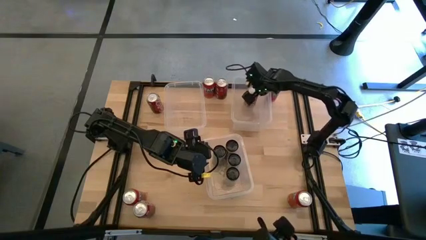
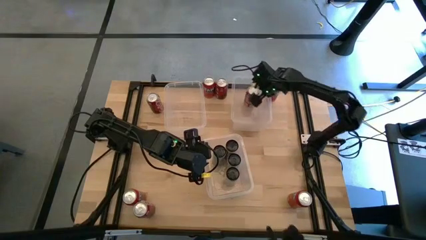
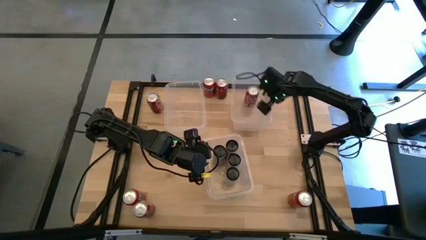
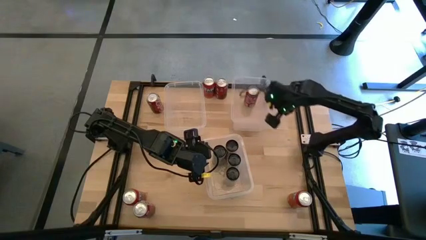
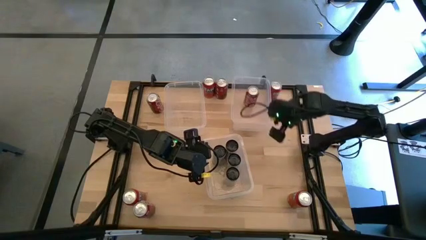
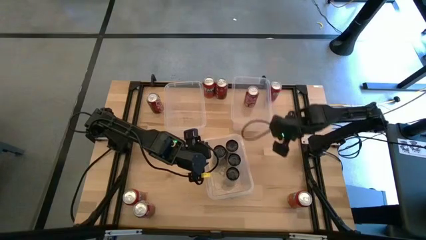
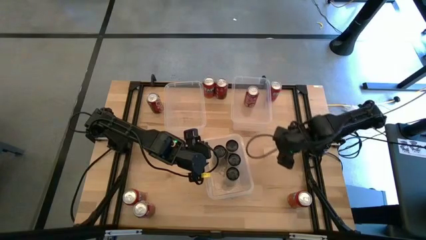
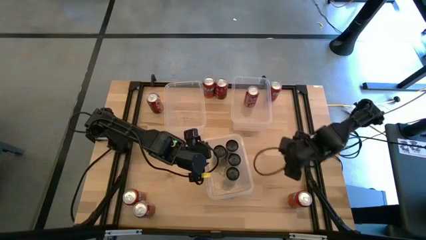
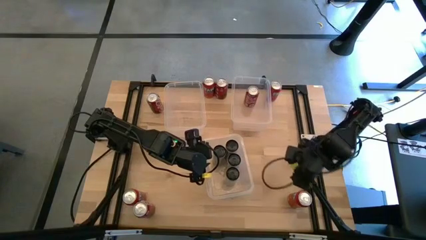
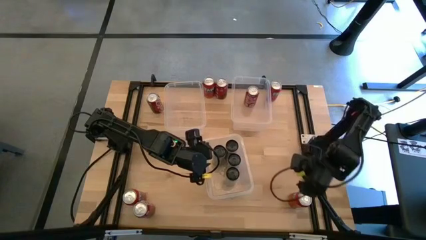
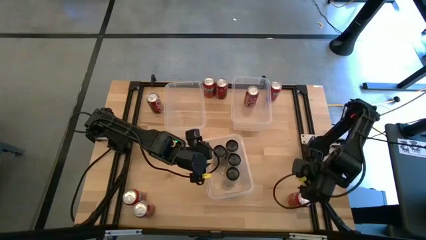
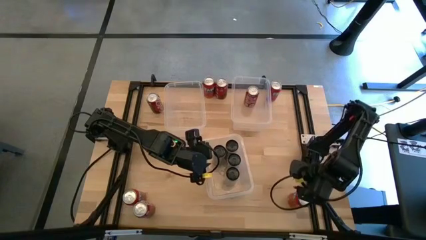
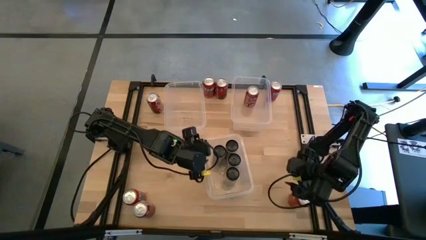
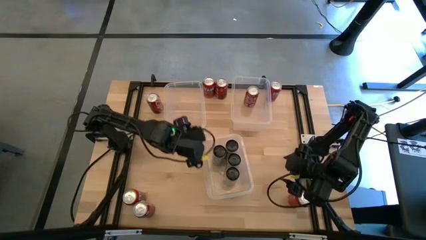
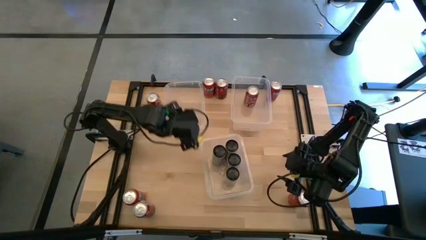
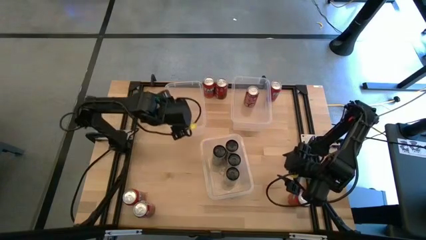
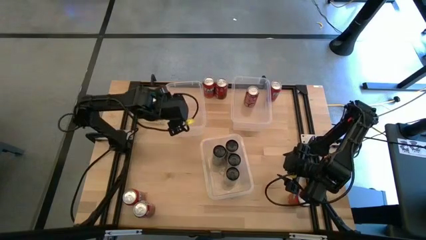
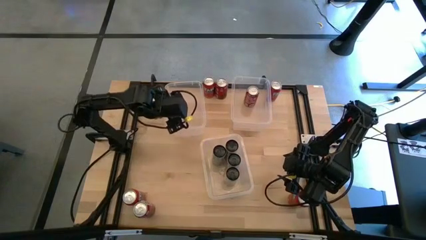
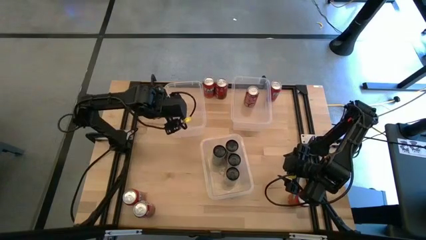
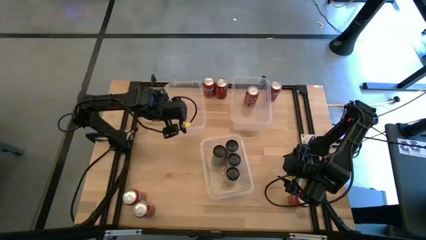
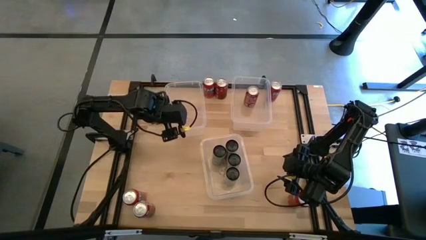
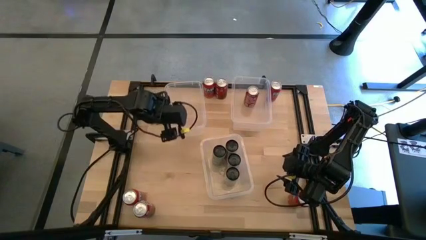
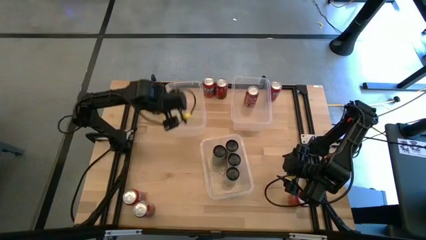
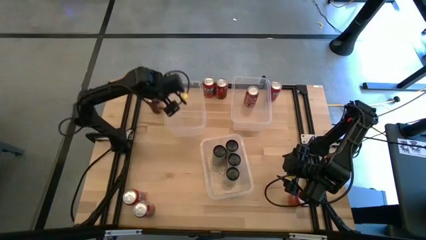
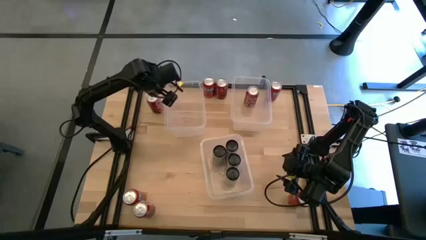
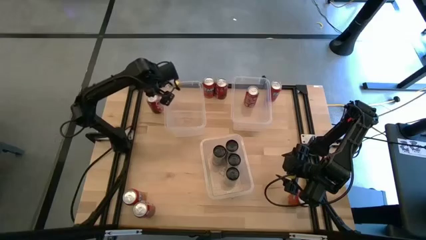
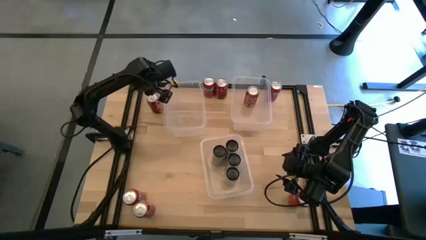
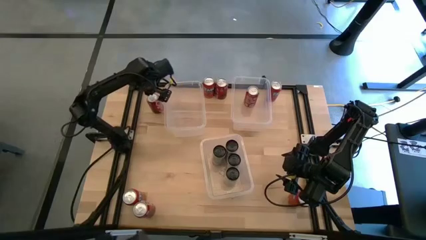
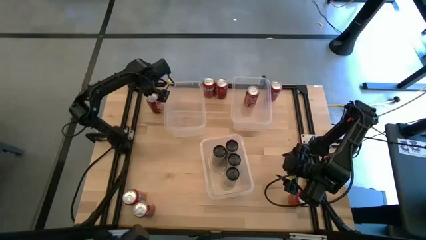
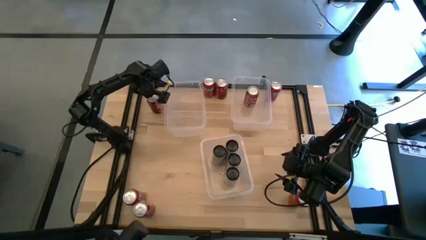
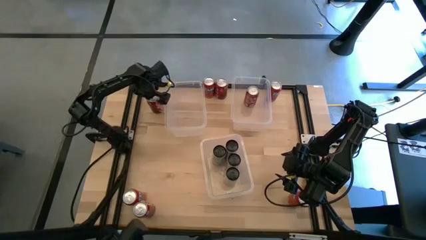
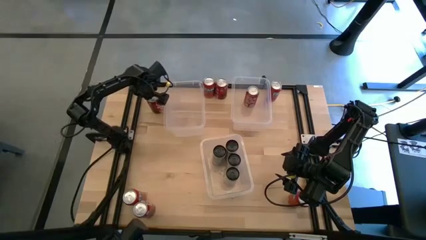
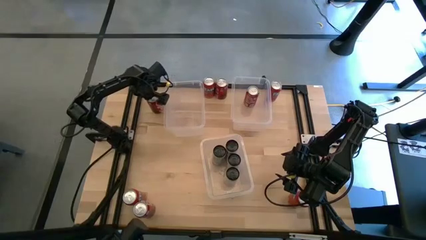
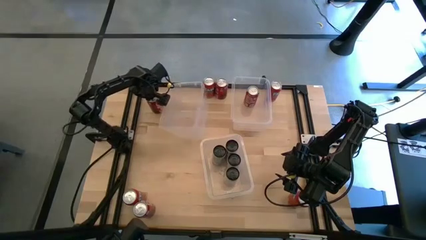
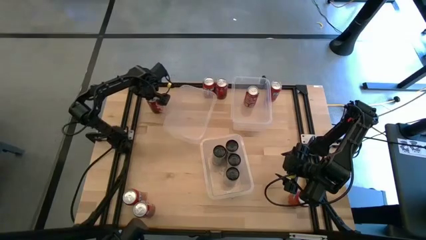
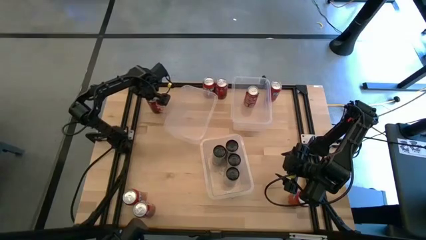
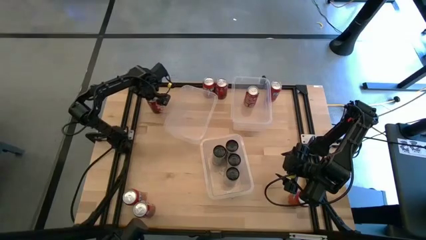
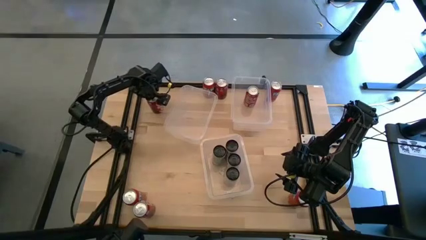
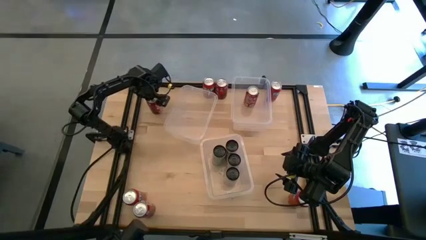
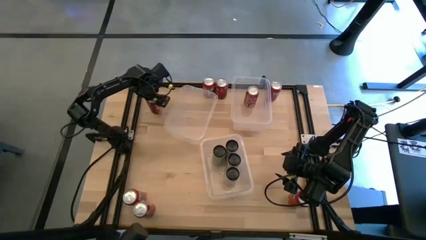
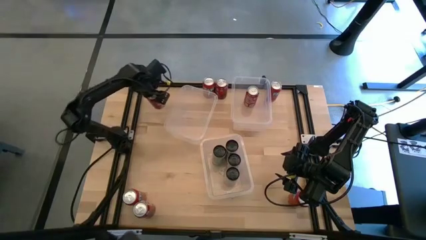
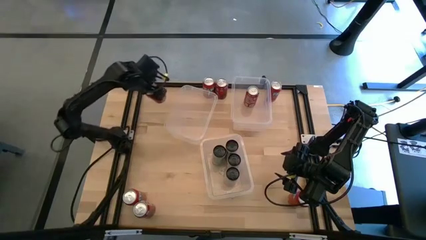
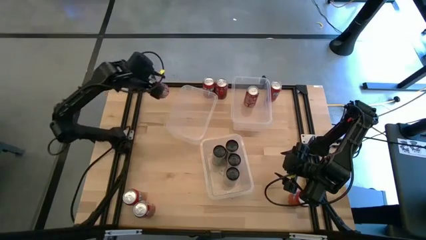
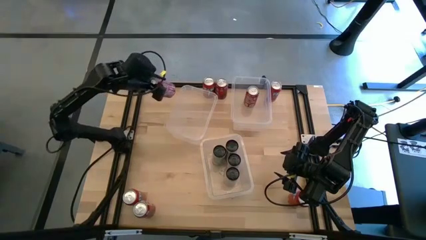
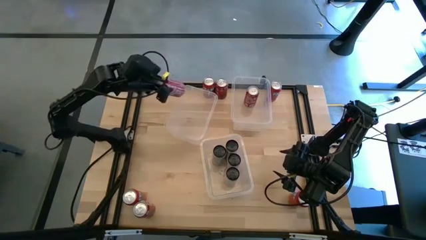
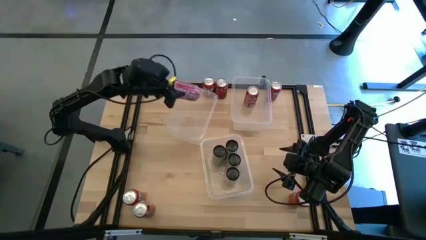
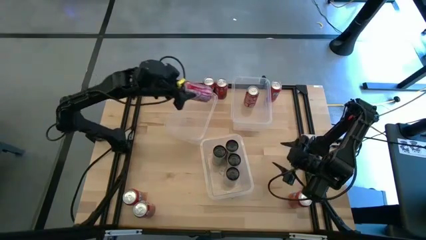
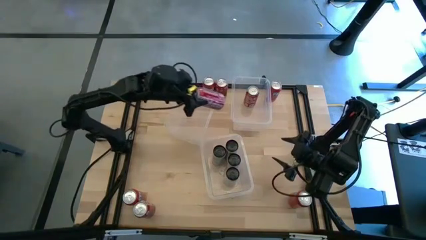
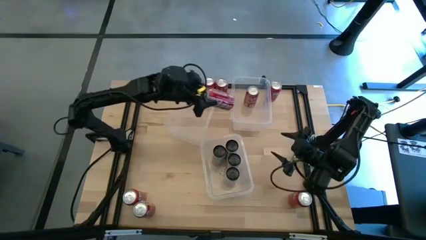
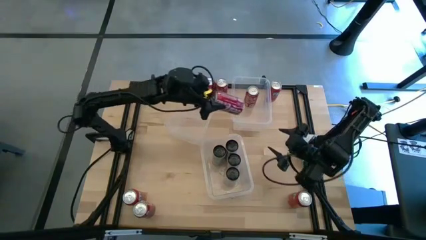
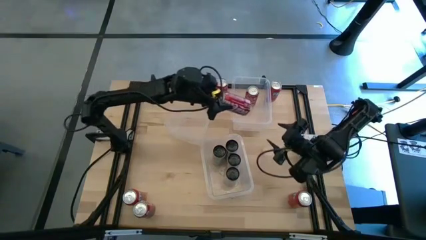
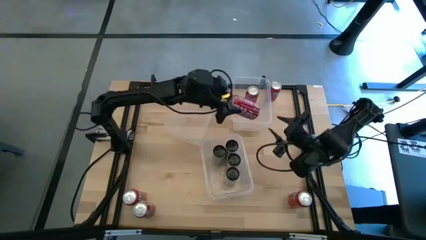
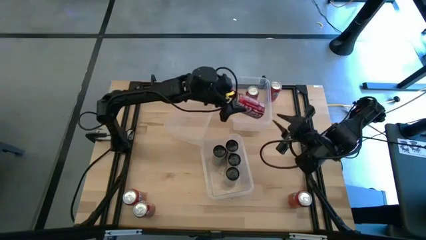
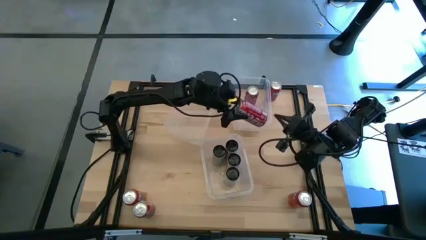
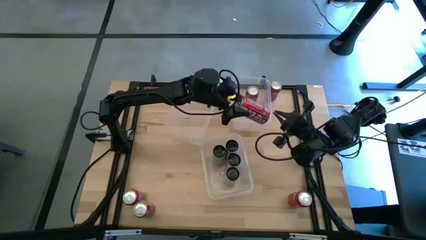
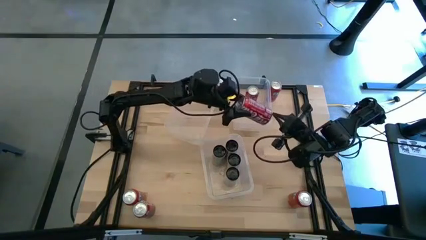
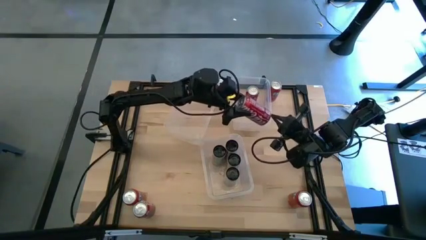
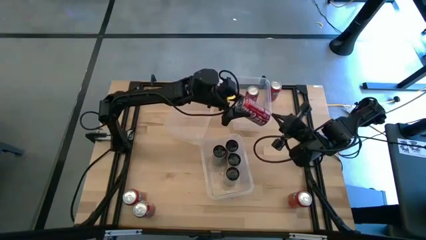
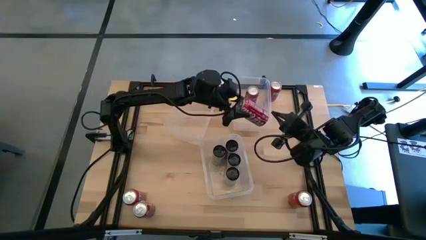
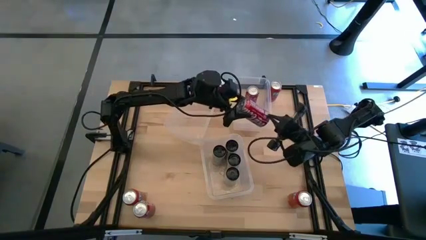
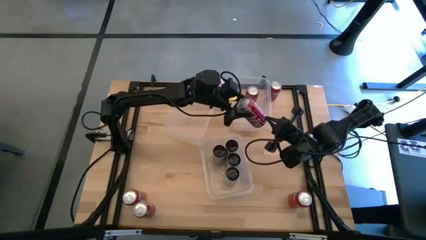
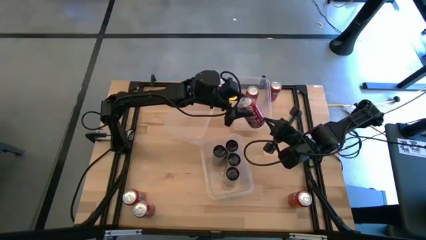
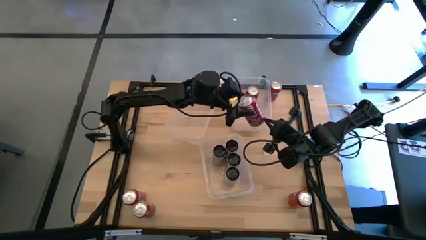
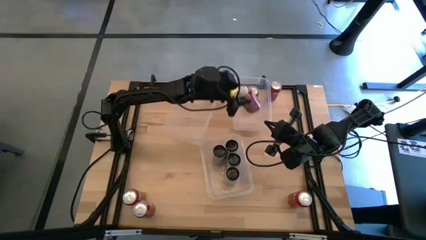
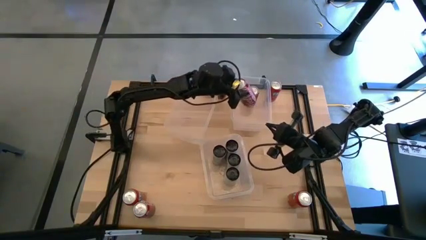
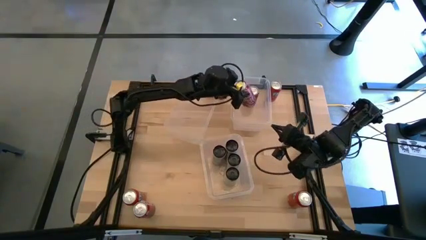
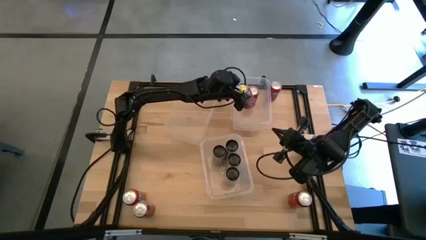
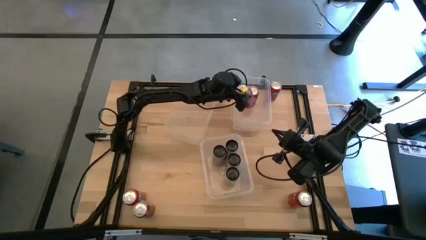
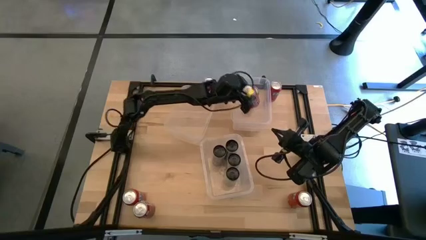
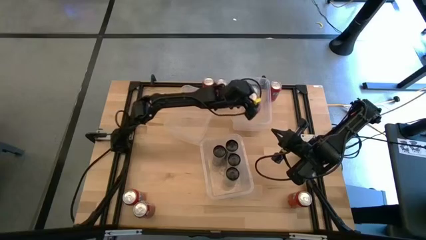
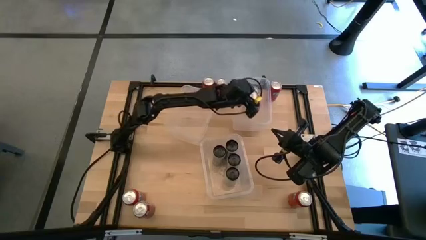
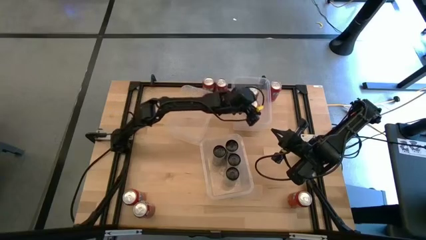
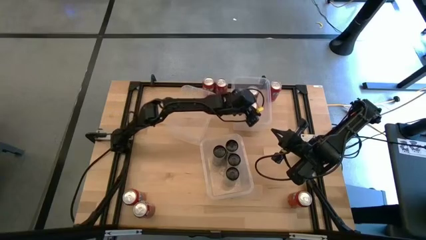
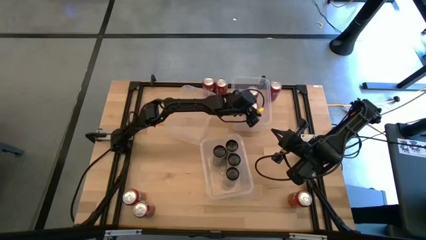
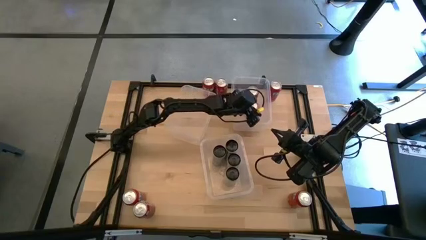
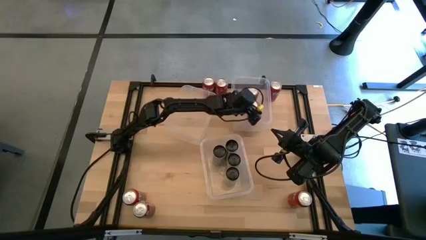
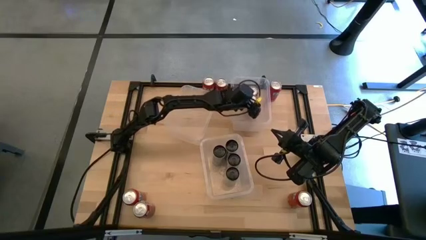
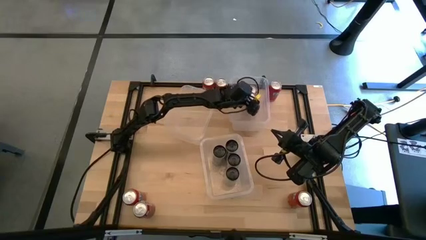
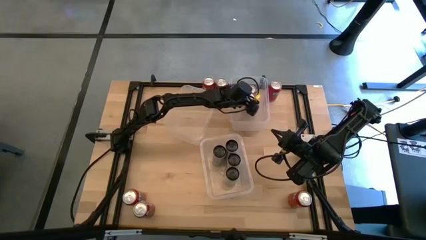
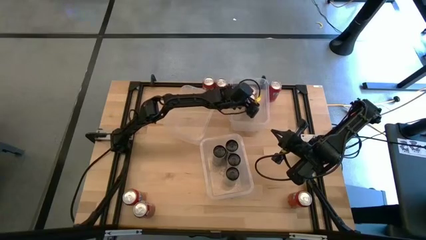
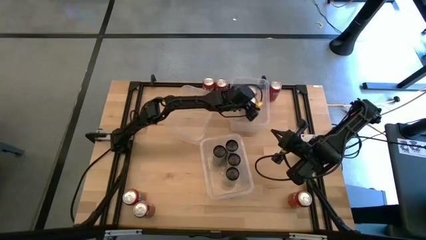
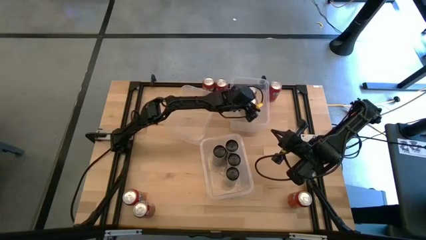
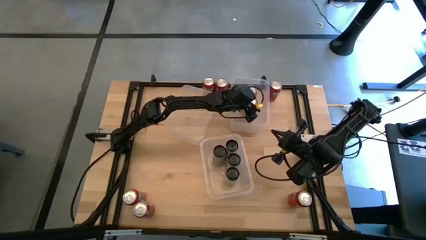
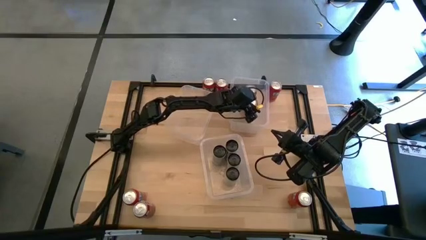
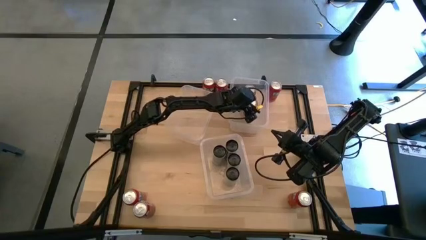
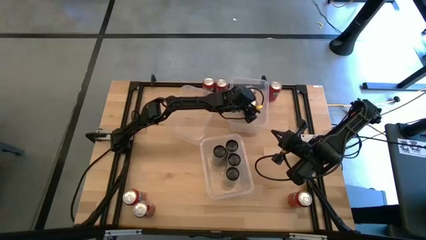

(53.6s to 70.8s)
Task: Sort soda cans
Put the red/white soda can into the right transparent bin

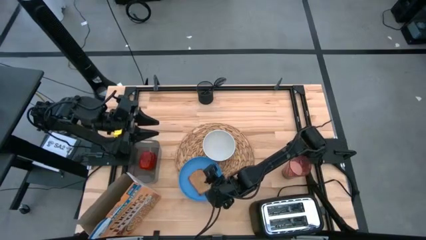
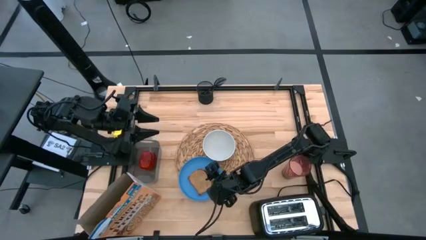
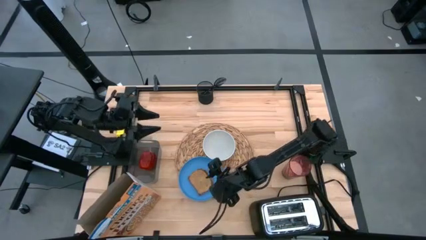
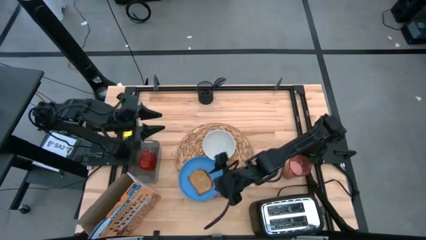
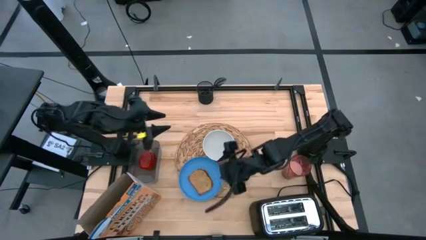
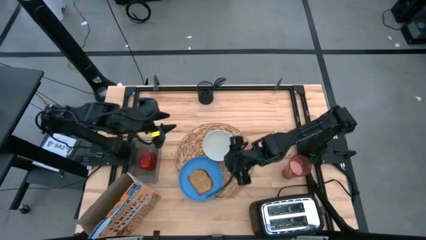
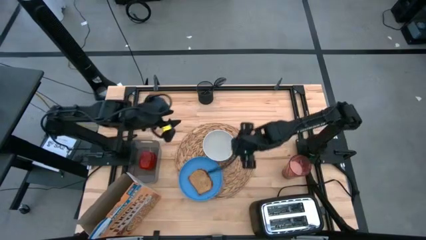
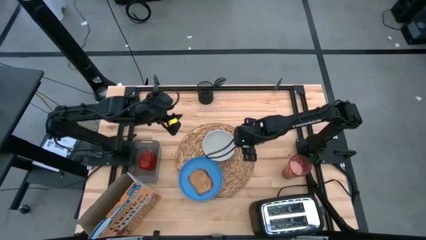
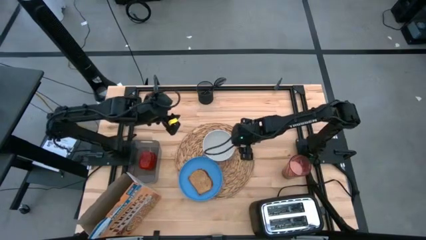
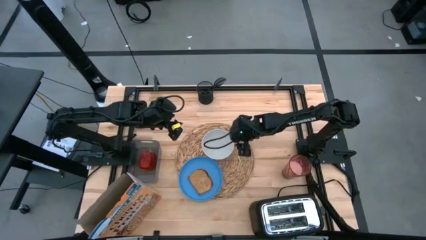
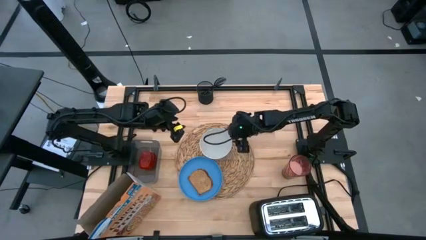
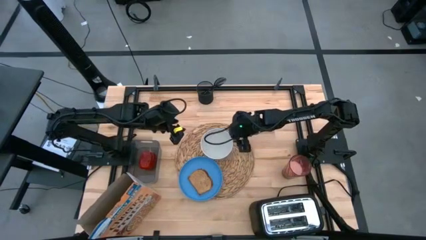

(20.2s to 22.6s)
Task: Arrange a breakfast setting
Adjust the white bowl on the brown placemat
